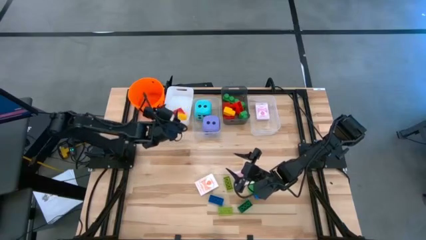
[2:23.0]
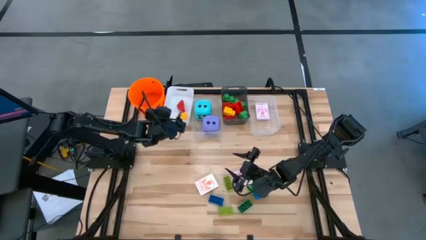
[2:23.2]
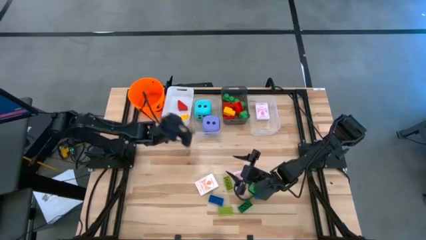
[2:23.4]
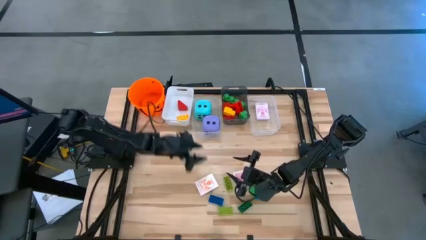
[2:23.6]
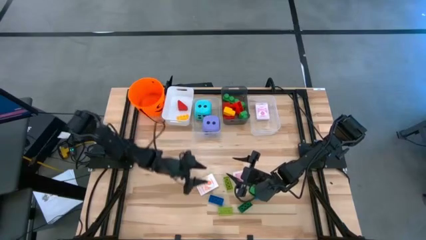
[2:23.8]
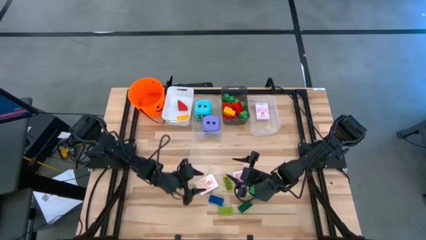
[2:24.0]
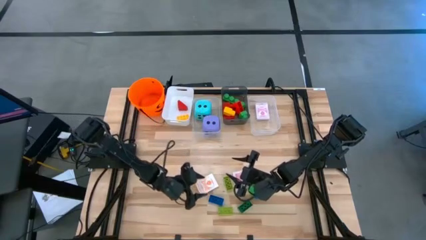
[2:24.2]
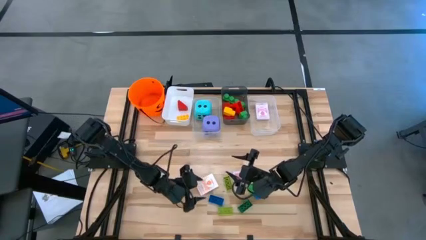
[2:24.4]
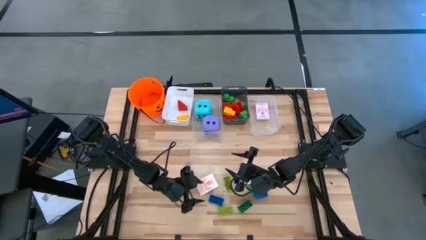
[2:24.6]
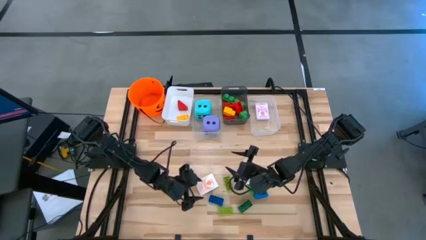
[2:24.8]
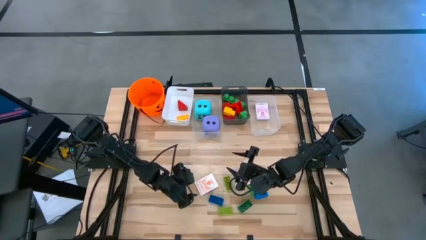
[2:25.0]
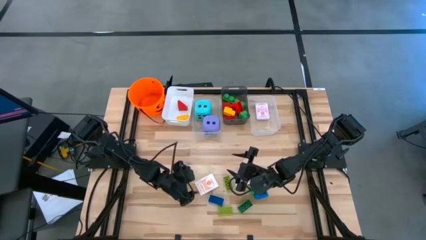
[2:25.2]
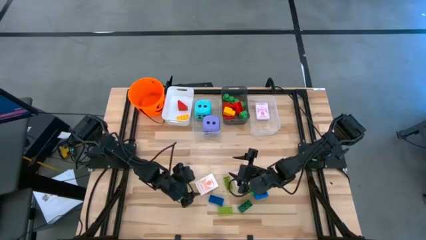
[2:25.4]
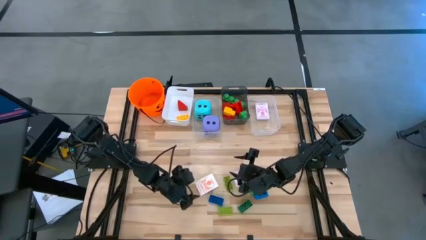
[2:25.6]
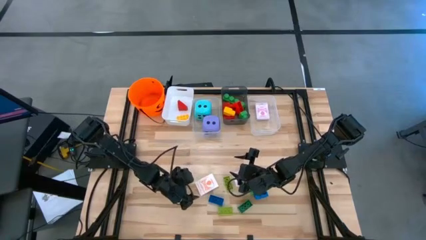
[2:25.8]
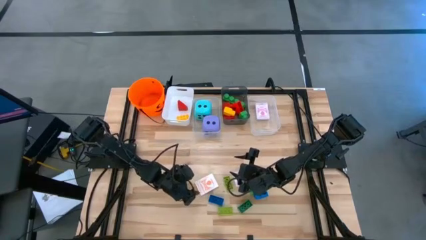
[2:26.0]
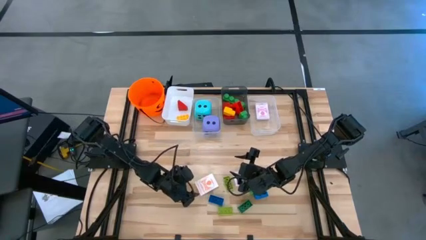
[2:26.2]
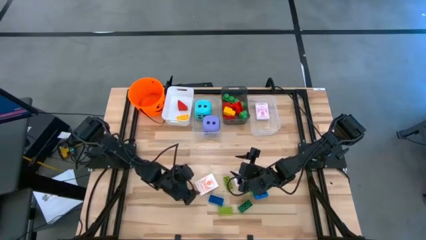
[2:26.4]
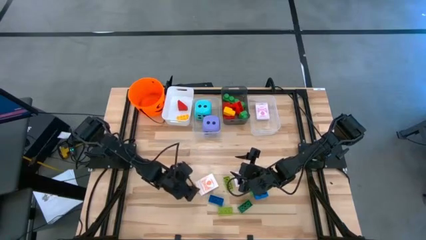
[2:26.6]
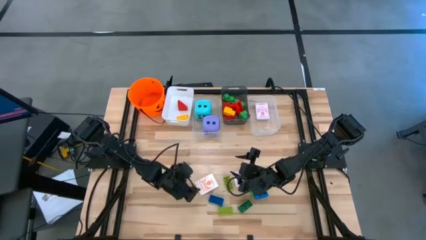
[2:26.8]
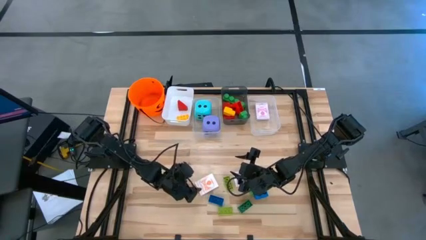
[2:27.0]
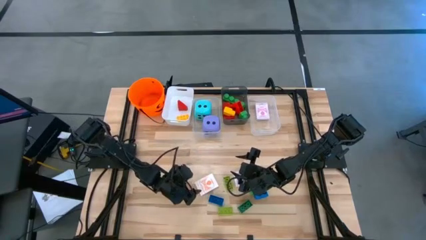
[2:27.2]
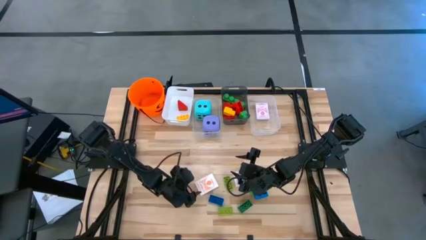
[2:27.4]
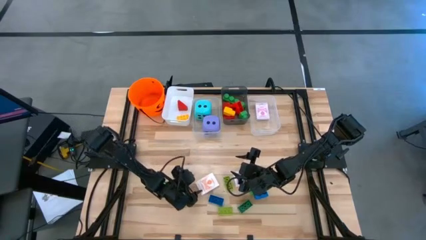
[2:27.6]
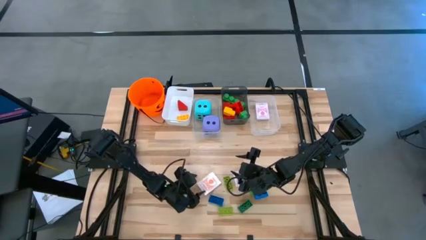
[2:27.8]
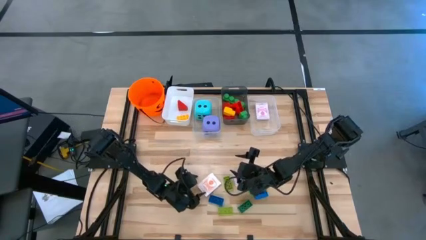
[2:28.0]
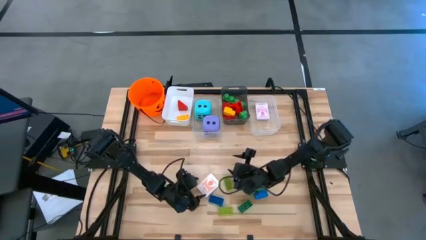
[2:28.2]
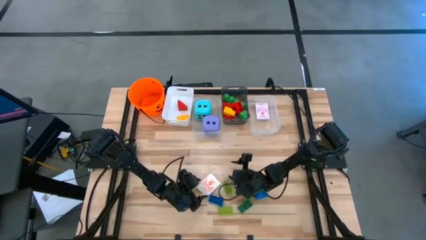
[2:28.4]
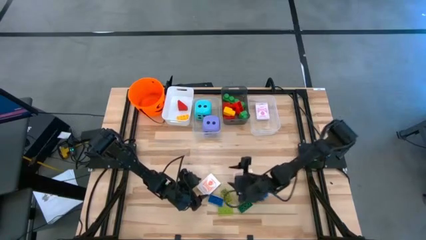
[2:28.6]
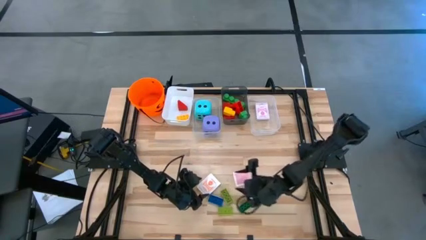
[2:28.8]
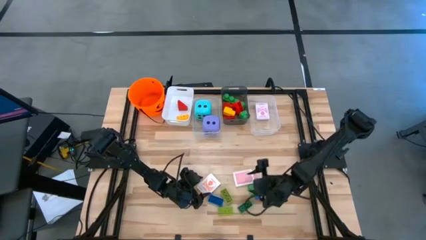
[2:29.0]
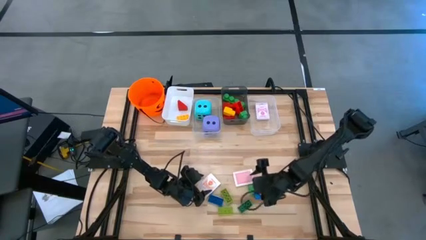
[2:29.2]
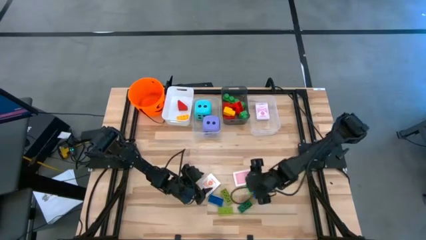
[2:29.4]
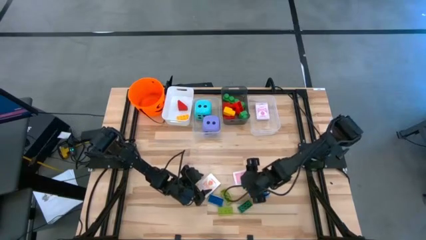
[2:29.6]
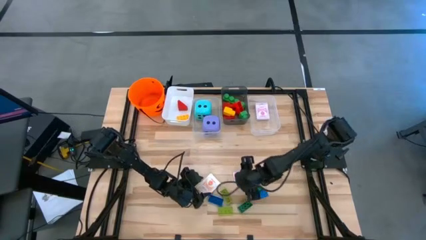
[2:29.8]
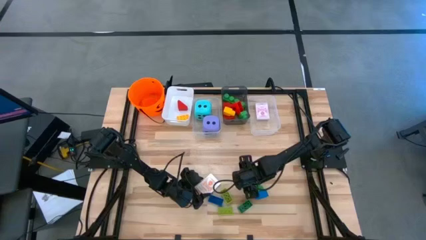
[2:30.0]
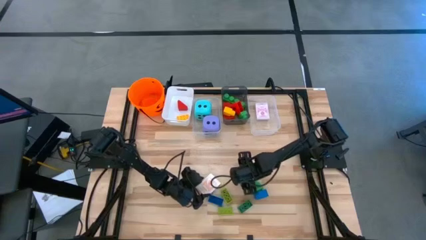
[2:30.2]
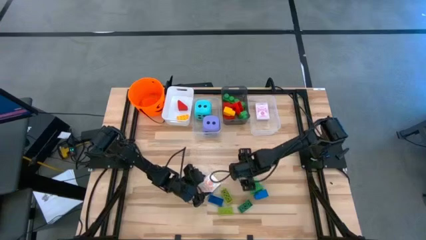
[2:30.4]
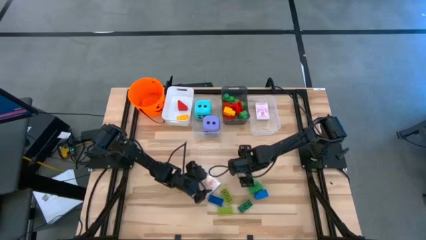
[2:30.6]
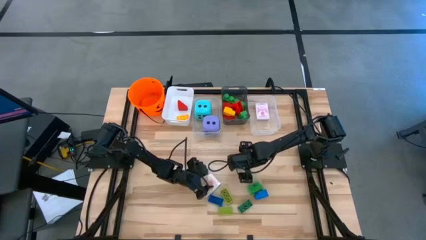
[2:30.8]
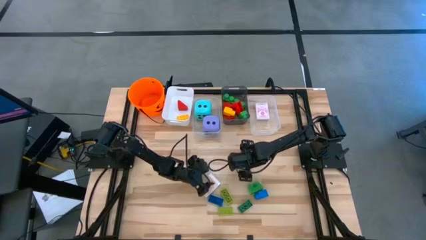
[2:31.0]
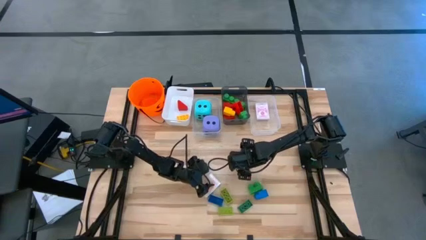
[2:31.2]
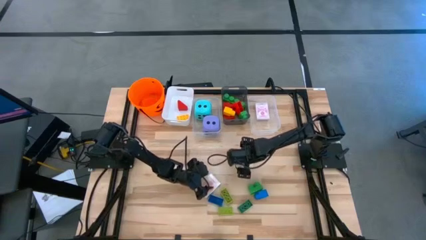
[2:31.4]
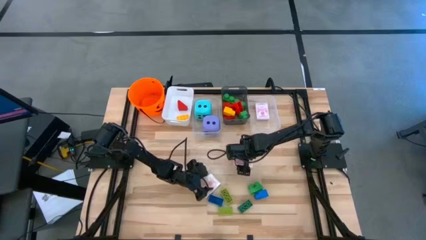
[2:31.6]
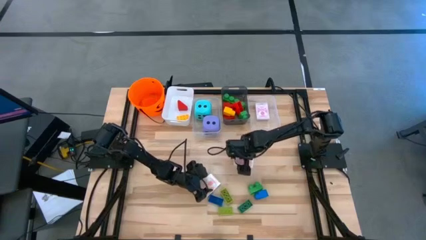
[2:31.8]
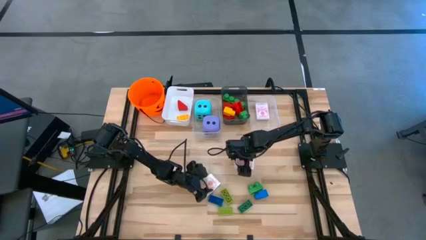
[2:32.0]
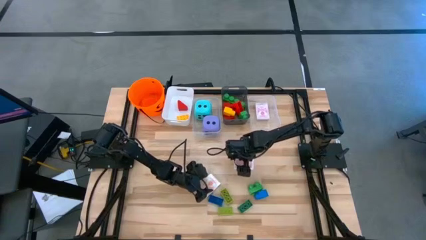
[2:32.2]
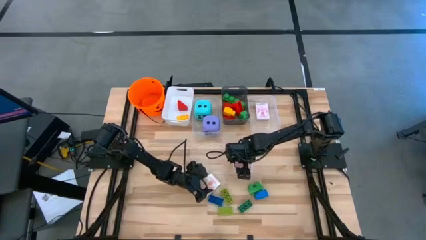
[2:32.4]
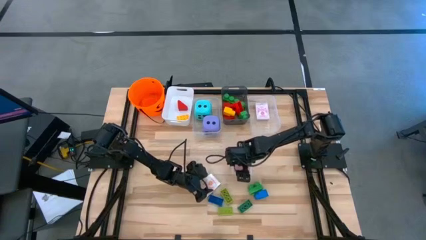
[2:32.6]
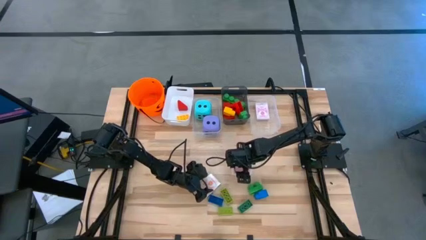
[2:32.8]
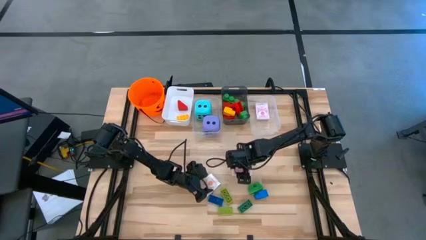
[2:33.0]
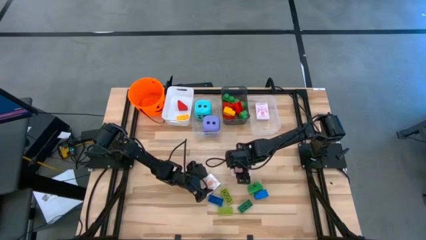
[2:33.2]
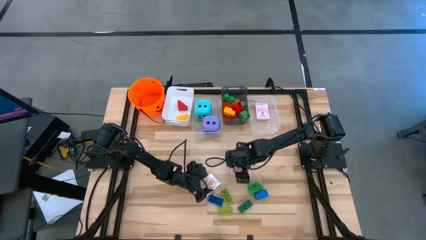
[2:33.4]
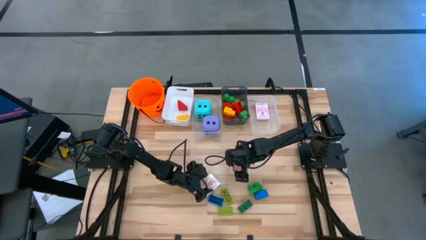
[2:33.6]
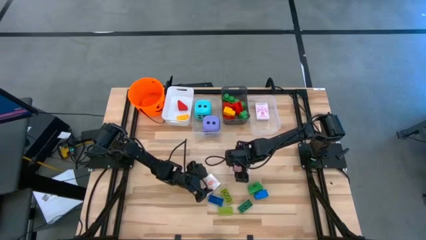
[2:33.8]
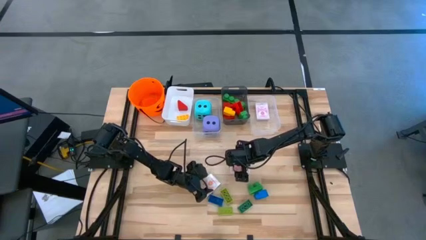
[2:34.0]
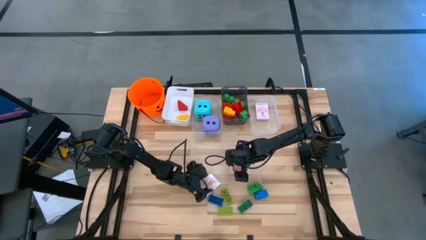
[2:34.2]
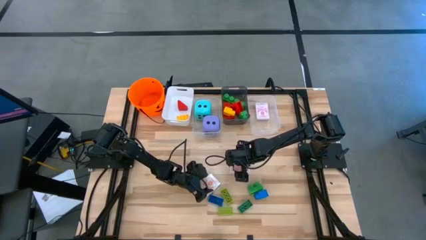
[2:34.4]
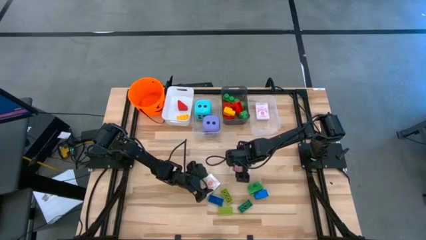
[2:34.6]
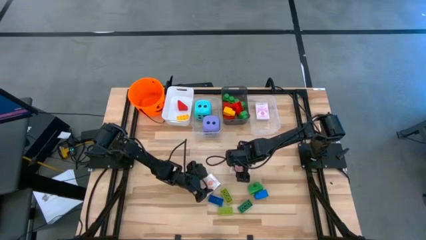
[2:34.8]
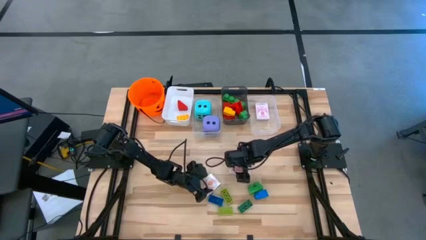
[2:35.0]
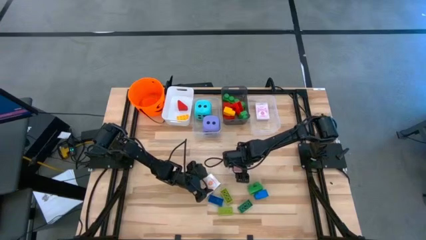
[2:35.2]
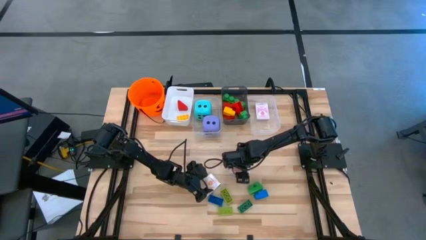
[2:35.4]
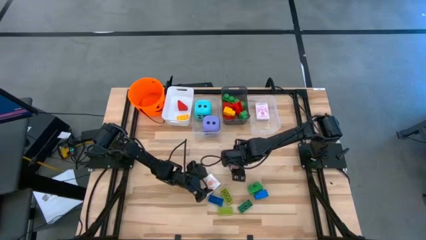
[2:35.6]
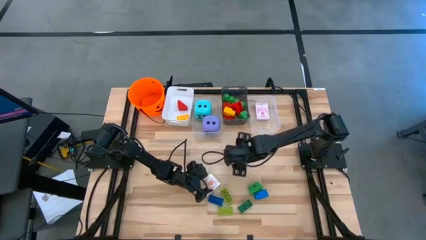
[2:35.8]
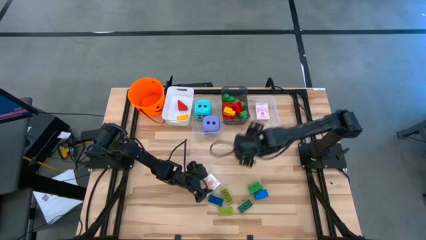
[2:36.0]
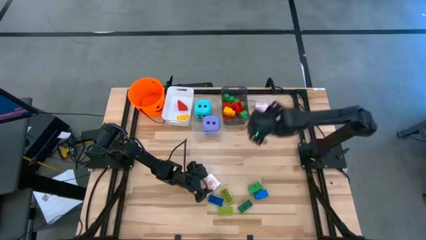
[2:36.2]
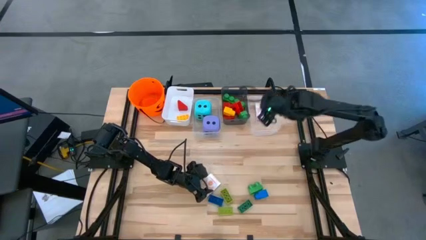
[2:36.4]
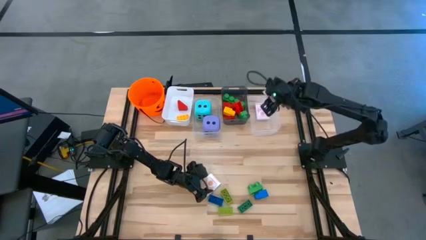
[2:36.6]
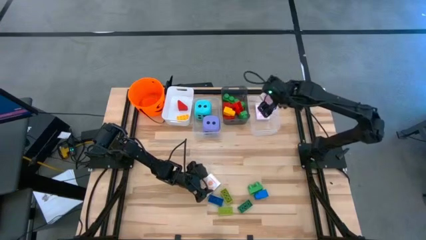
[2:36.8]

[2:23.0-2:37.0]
Task: Pick & Place Toys
Put the red deck of cards into the right transparent bin

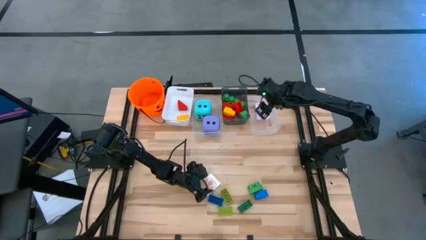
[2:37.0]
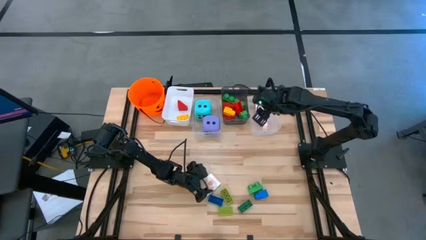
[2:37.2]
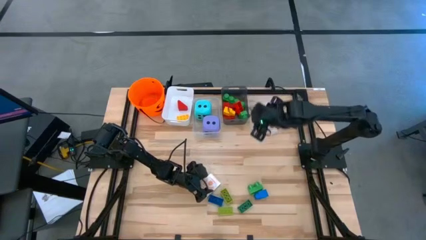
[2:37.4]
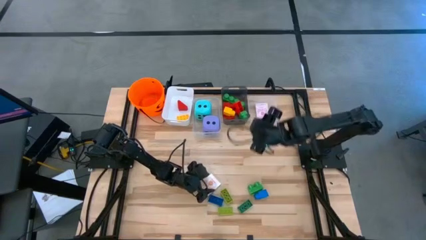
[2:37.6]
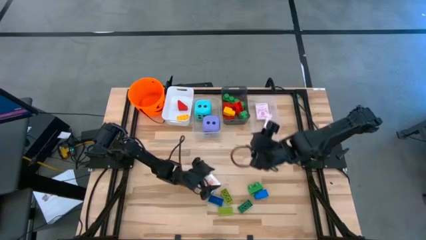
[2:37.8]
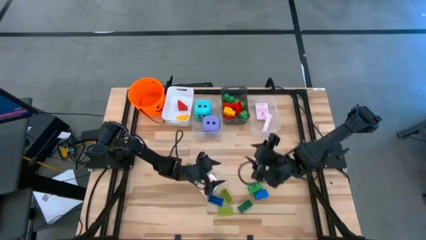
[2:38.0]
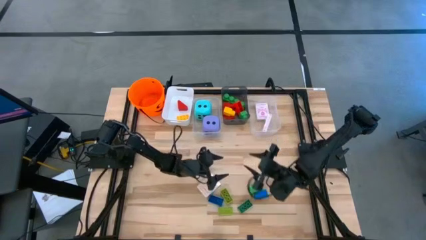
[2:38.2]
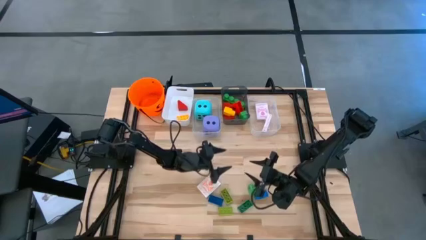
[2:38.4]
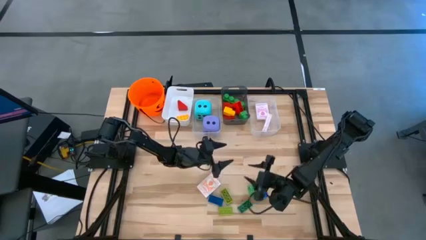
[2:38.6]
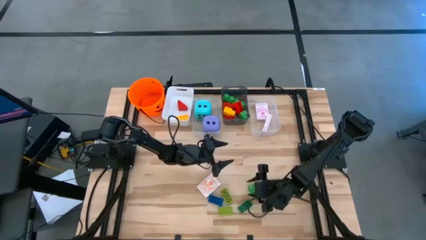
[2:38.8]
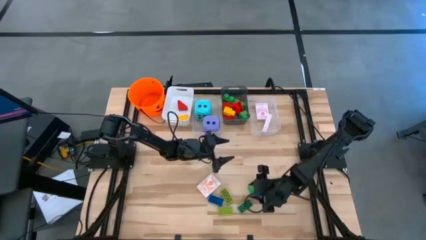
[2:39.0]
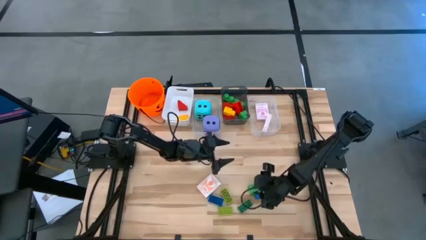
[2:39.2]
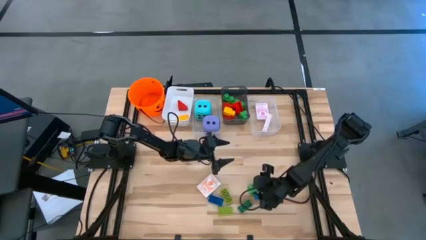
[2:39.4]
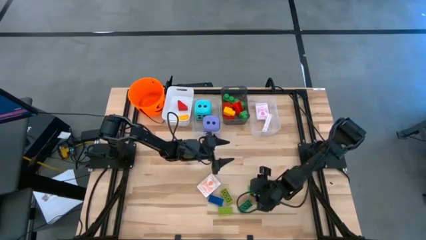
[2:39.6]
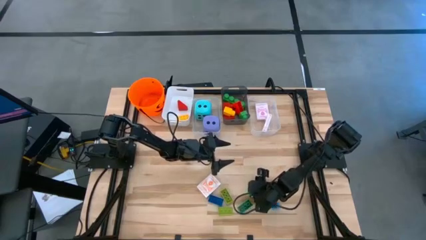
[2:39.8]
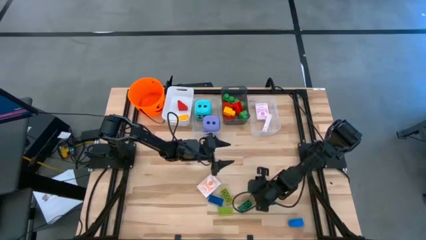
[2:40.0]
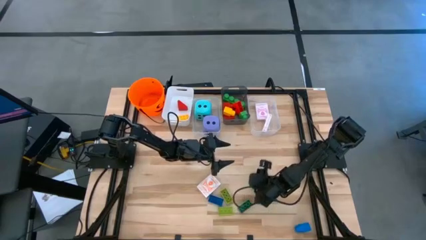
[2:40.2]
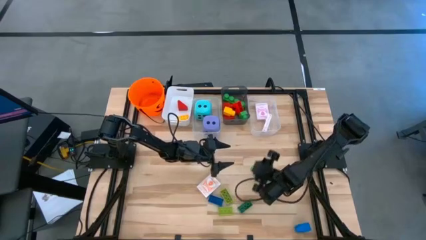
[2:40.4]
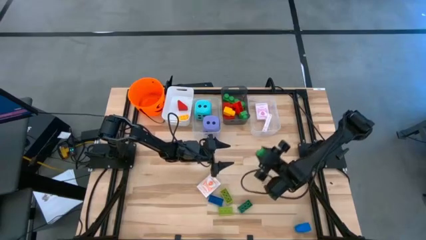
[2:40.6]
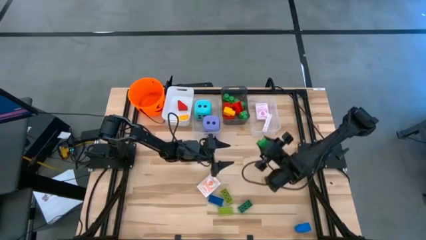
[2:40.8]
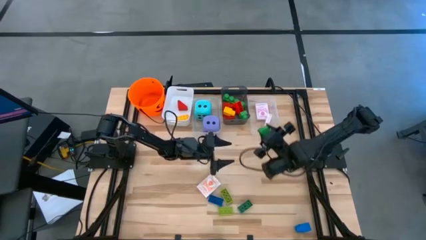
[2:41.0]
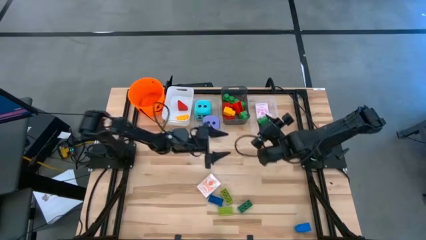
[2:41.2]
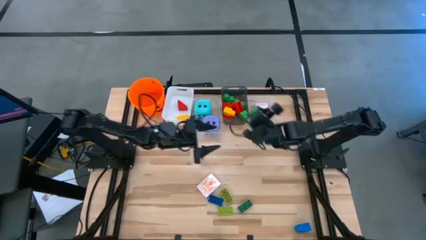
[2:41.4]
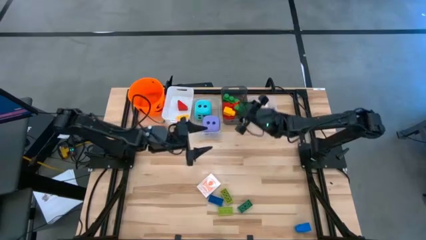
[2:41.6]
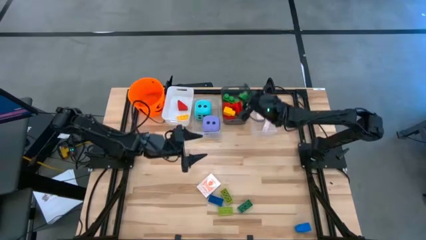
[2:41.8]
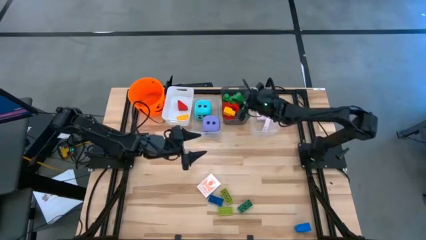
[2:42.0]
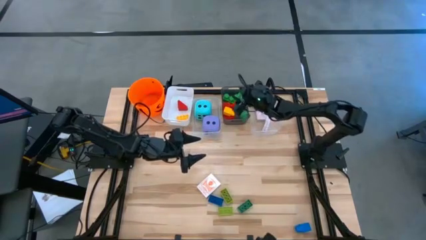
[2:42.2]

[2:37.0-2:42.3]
Put the large green game piece into the black bin
